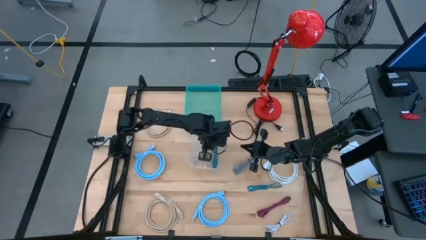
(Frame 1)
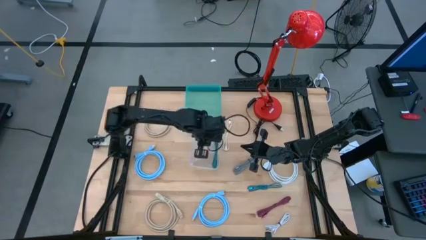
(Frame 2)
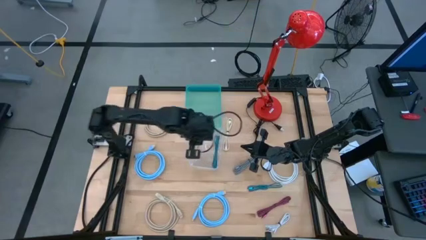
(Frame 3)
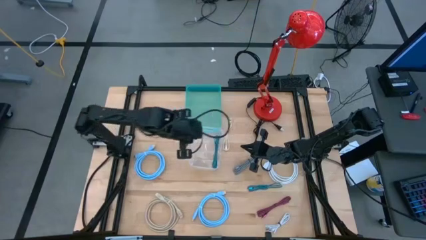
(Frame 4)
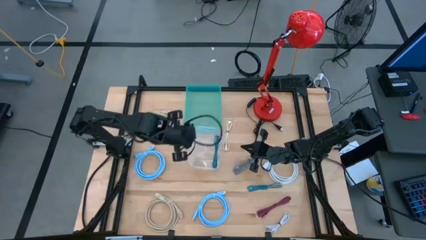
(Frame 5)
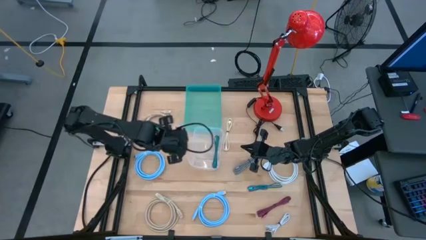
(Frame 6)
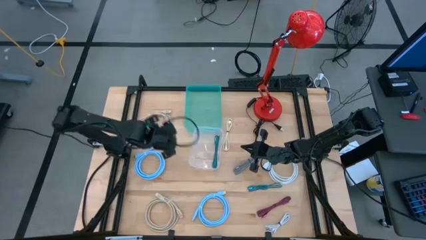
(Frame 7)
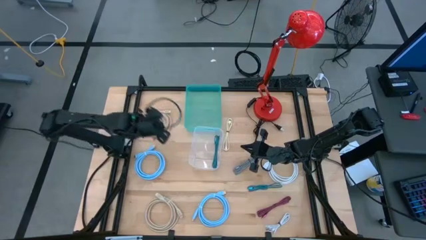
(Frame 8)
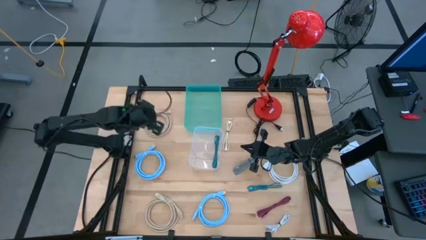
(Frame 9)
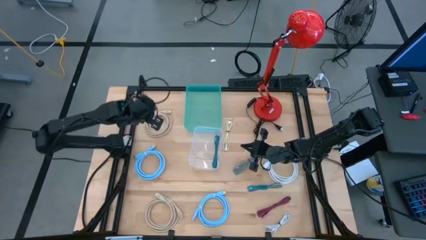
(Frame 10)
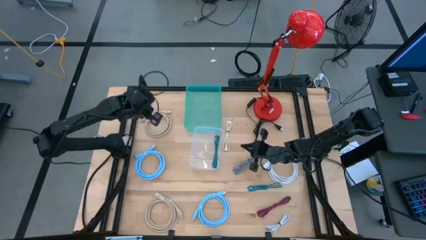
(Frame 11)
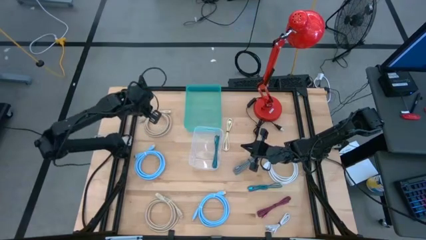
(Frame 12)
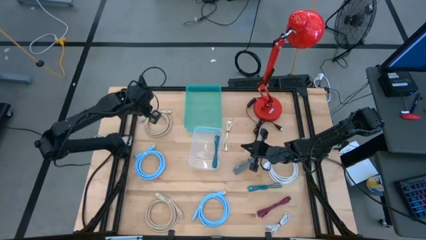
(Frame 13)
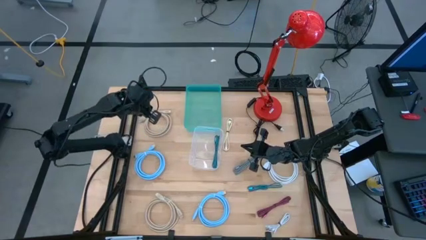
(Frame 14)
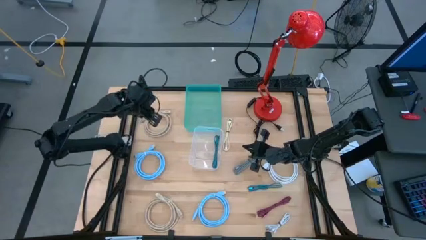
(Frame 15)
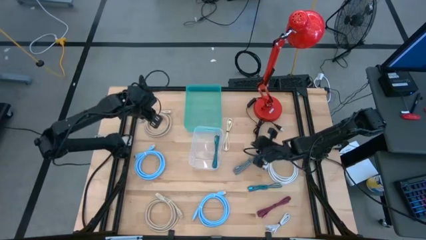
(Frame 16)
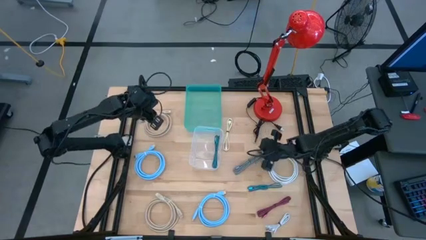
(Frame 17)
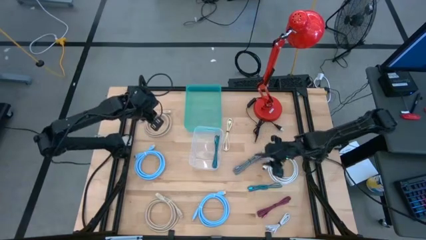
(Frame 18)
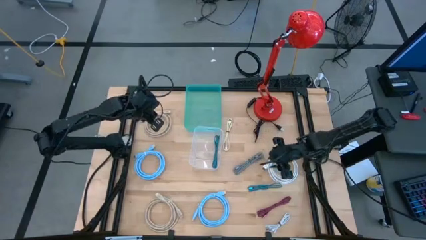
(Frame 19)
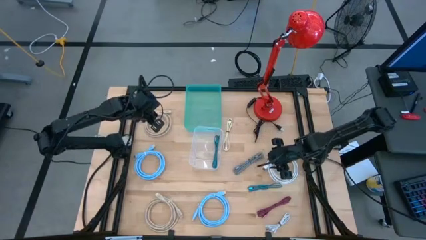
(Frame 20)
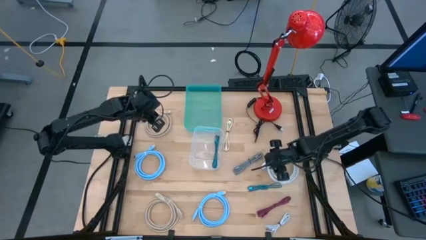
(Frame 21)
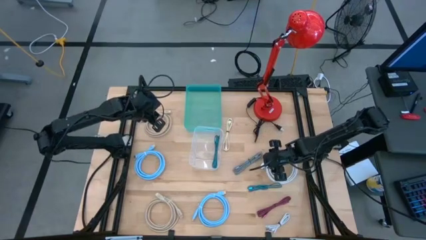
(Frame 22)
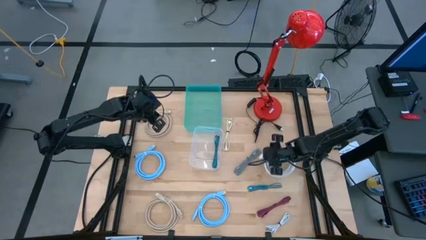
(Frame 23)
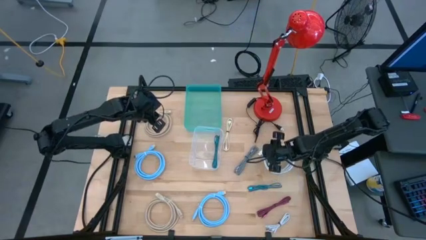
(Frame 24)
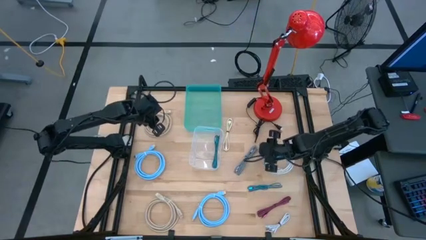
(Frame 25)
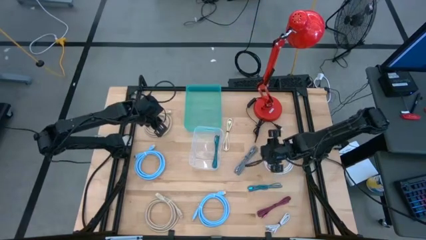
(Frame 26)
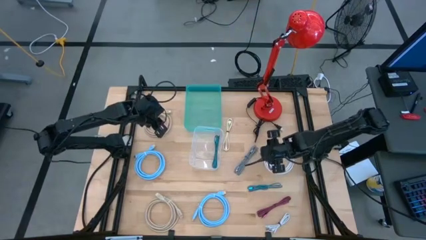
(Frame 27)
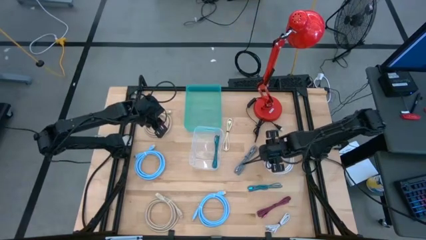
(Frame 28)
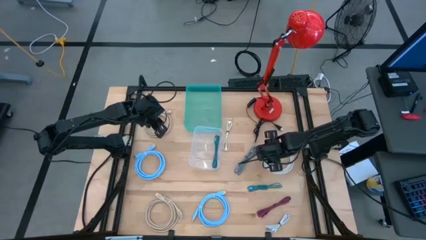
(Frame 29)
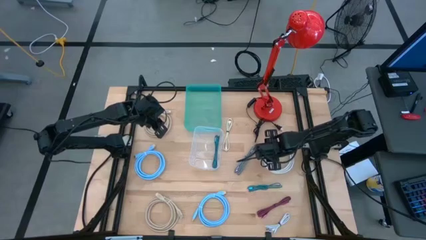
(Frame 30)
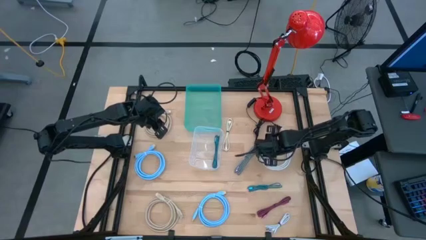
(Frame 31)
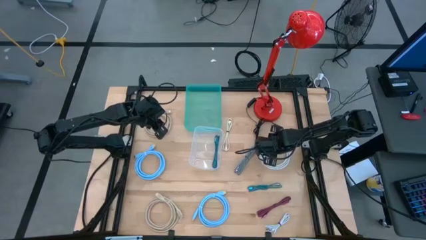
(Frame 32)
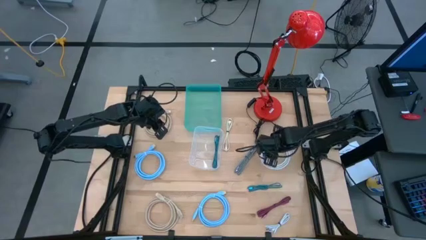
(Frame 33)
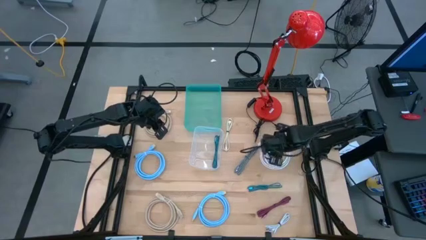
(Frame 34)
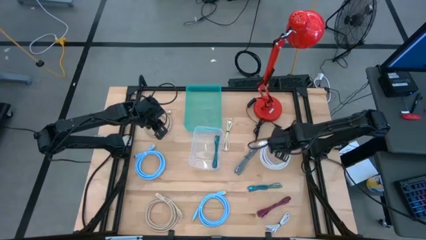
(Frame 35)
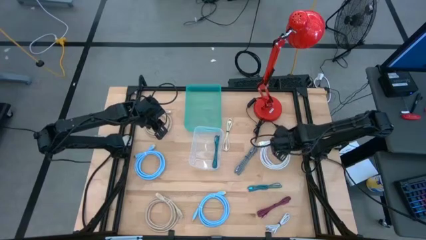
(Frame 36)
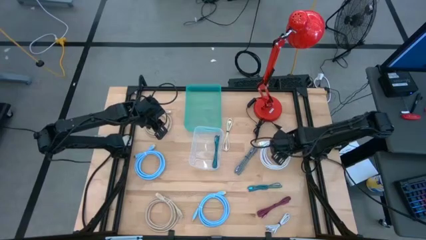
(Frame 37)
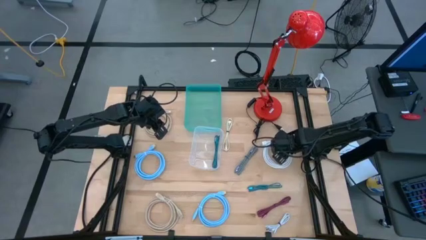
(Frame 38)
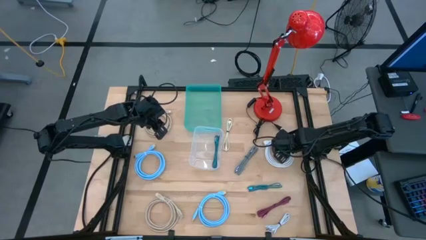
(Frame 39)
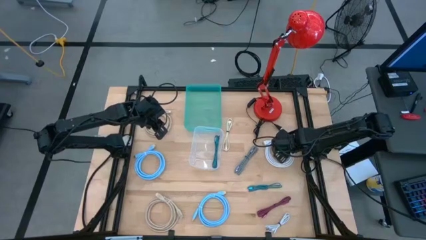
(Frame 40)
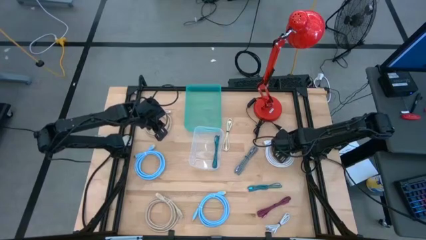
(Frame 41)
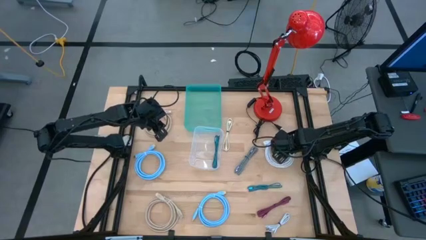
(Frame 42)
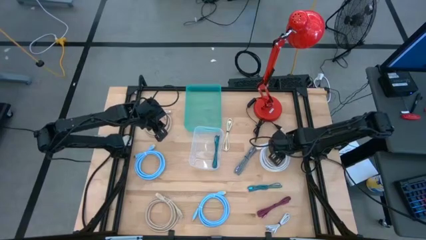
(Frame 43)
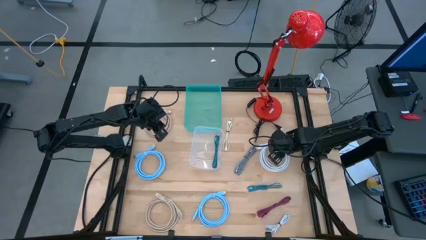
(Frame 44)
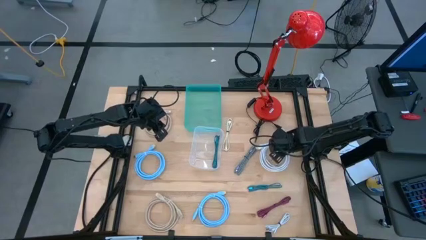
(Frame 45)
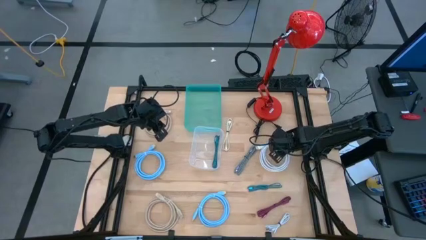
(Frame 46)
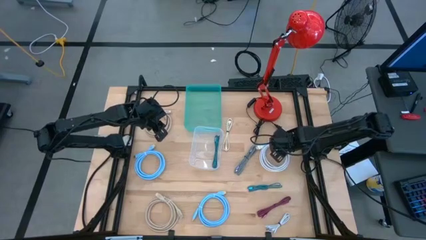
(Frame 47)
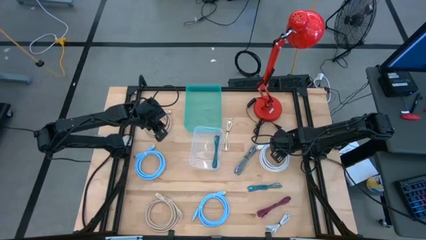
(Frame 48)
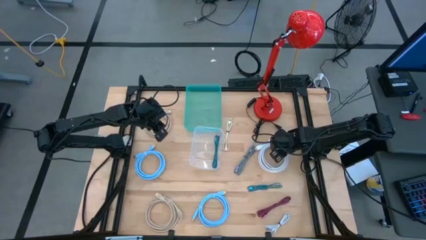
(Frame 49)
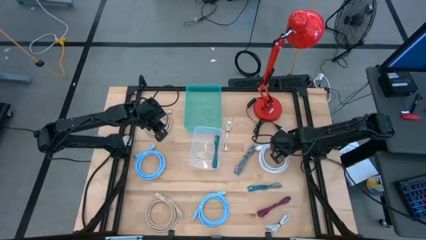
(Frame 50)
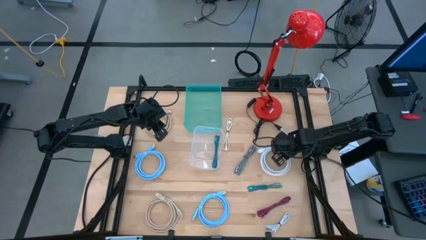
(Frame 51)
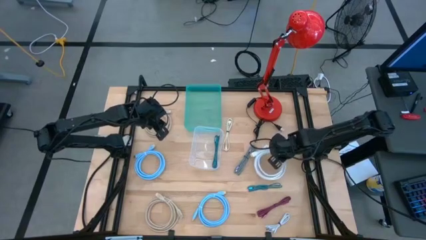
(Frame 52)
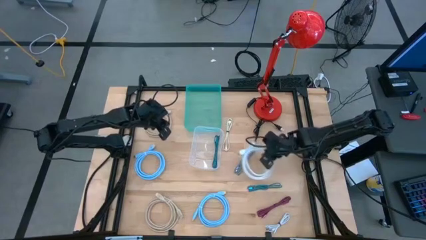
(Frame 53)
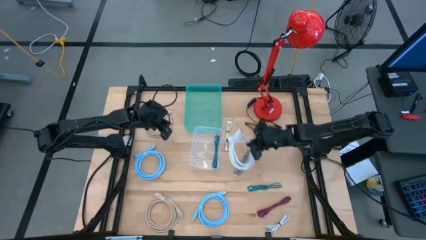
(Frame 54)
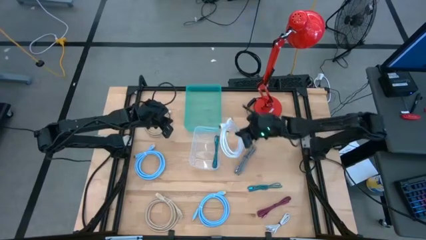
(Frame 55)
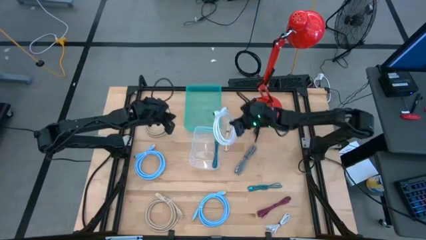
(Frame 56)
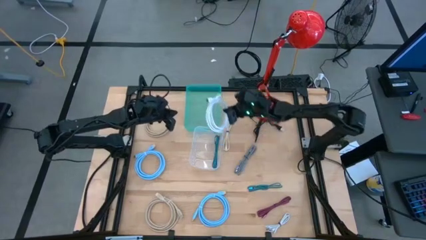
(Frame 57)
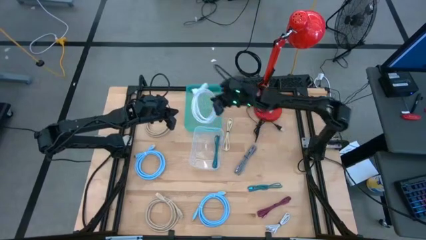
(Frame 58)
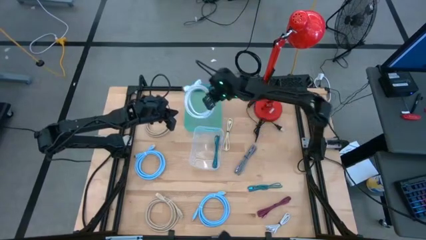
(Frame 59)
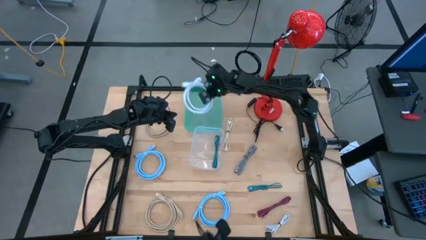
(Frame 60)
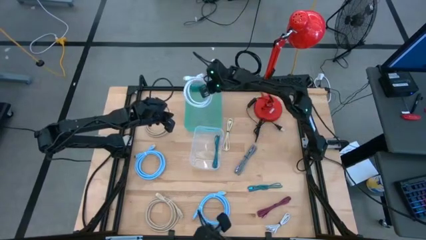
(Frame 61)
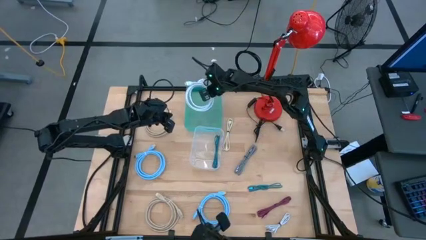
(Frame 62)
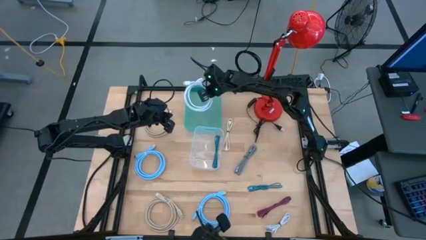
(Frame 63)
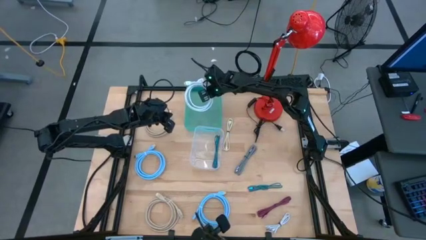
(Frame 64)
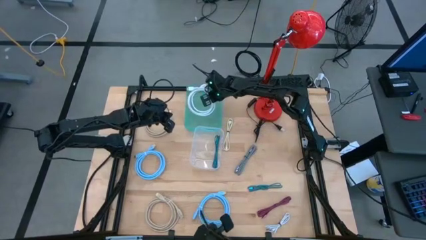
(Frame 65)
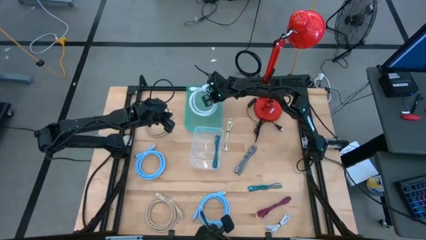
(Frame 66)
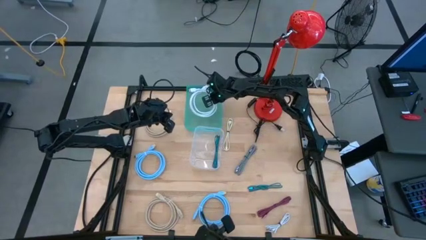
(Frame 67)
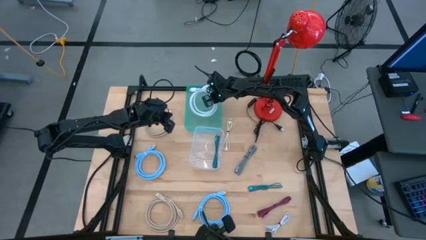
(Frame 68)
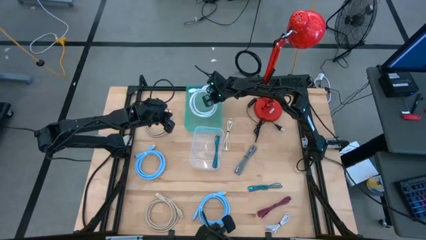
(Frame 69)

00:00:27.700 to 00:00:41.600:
Task: Pick & Place USB Port
Put the white rolled USB cable into the blue bin
